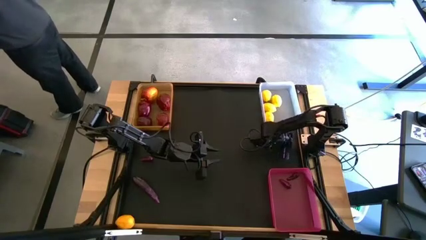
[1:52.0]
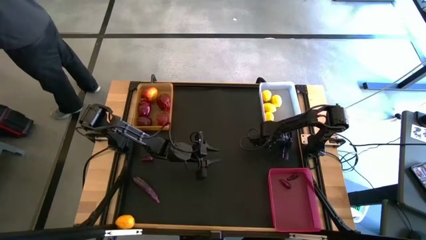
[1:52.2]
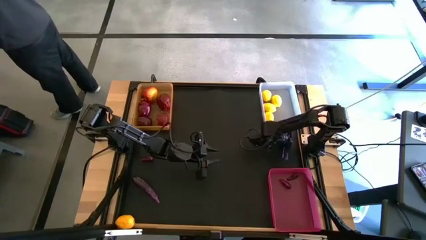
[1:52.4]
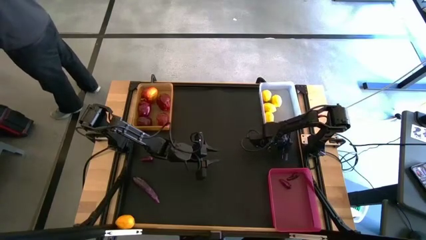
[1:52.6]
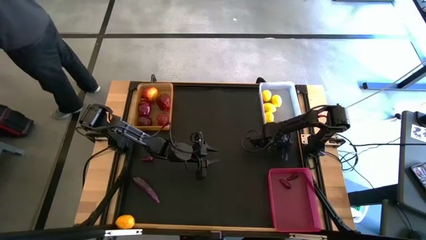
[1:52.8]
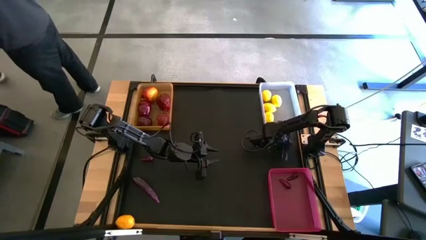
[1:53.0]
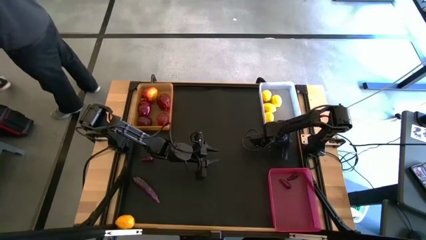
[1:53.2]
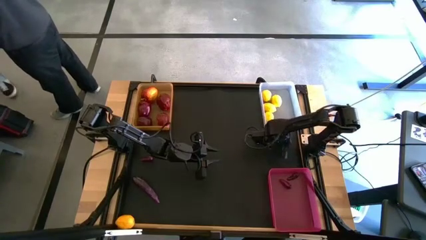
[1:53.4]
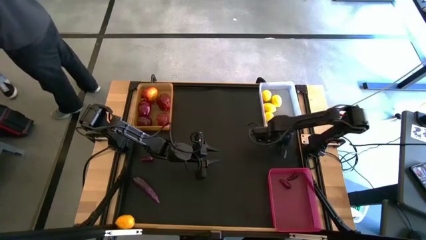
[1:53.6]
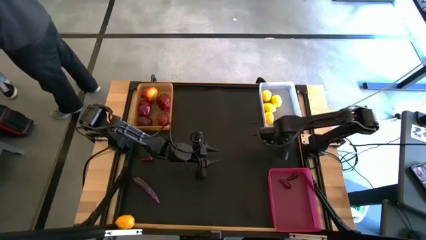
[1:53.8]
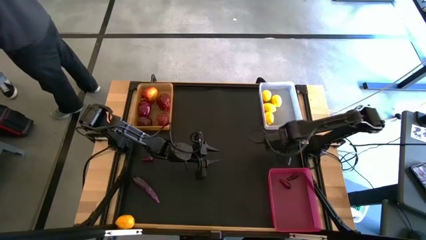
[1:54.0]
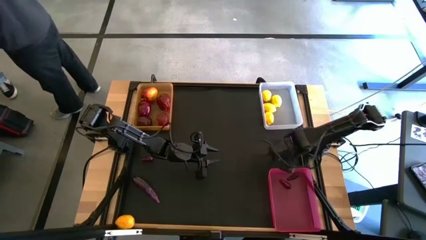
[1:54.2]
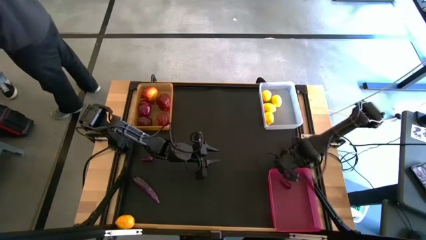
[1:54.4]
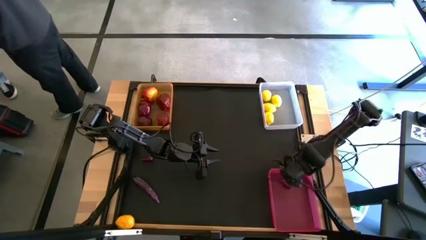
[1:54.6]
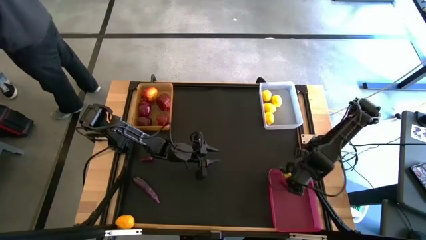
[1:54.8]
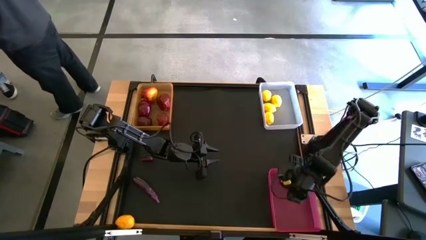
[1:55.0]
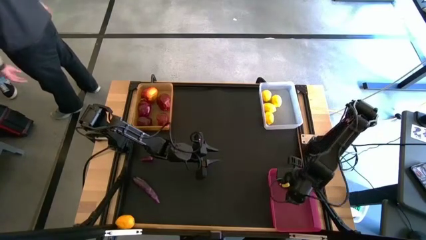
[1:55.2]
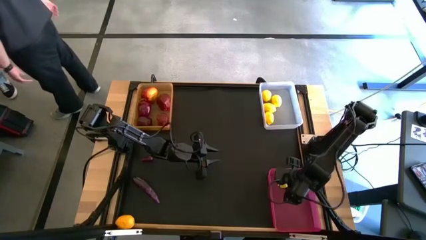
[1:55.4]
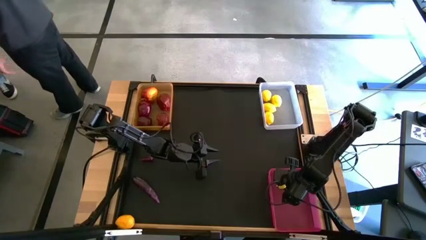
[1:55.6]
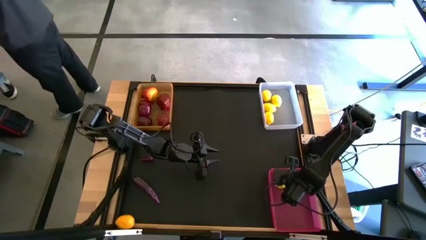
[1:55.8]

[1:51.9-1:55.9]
Task: Sort produce into baskets
Put the eggplant into the red bin

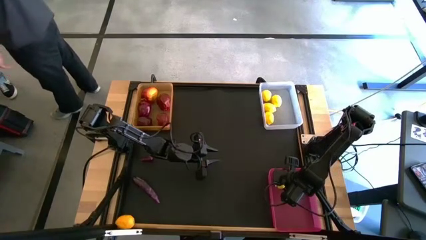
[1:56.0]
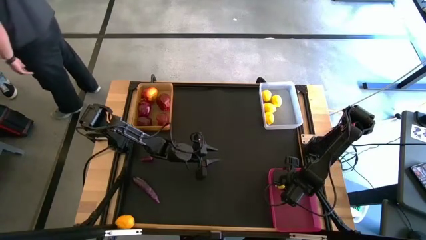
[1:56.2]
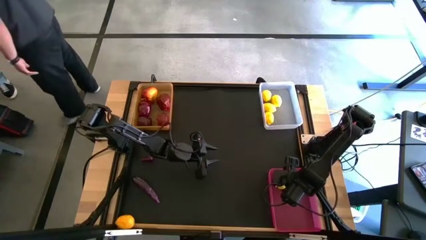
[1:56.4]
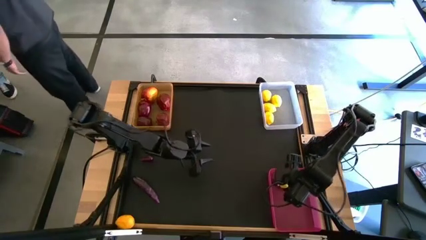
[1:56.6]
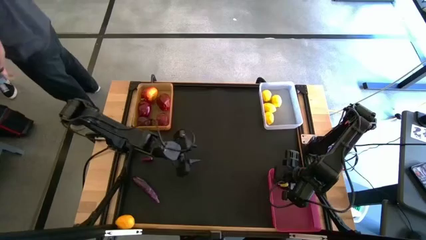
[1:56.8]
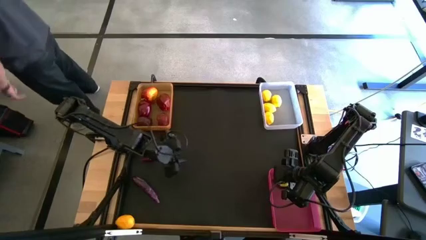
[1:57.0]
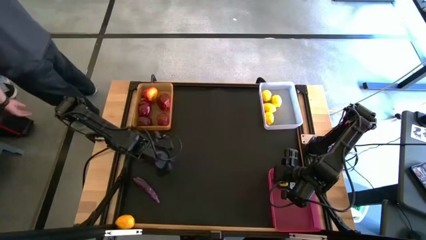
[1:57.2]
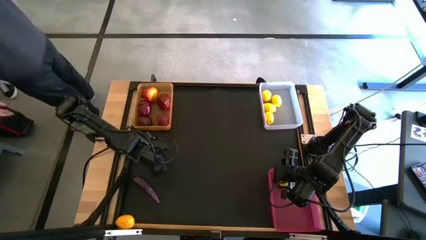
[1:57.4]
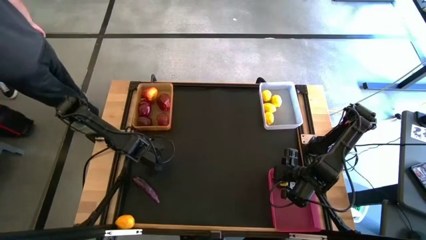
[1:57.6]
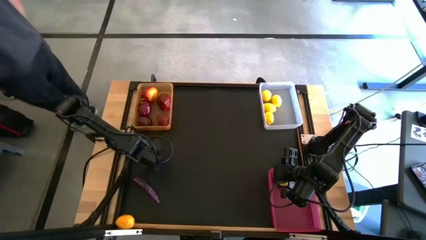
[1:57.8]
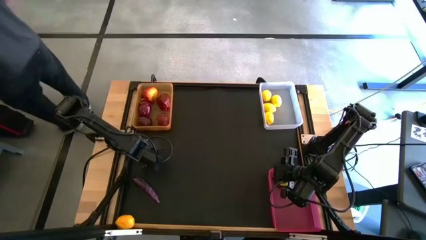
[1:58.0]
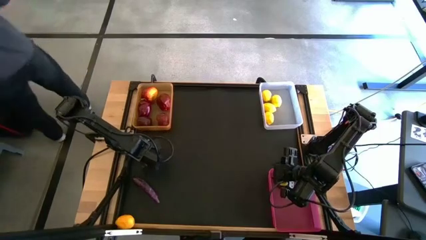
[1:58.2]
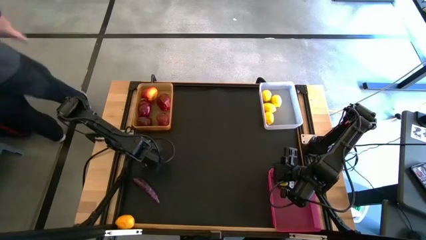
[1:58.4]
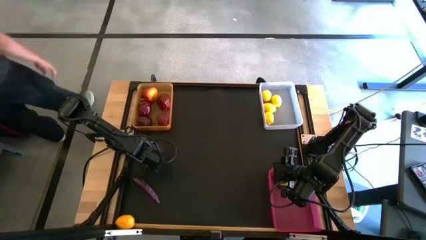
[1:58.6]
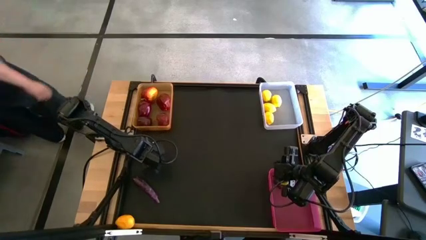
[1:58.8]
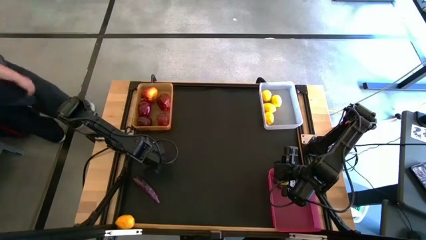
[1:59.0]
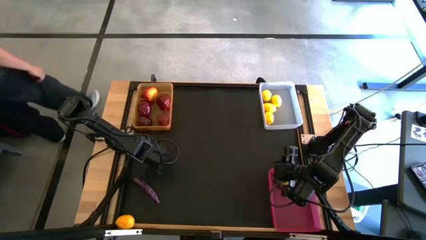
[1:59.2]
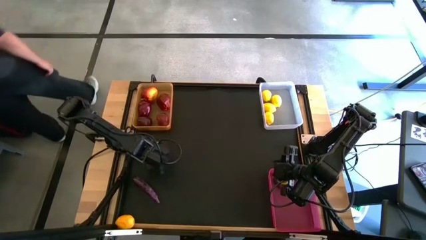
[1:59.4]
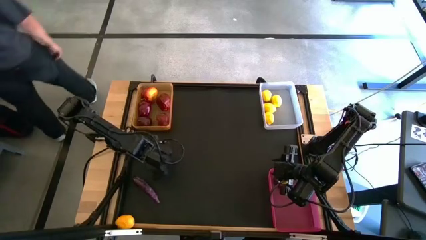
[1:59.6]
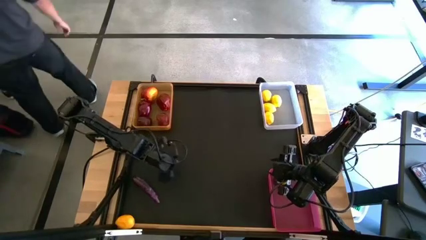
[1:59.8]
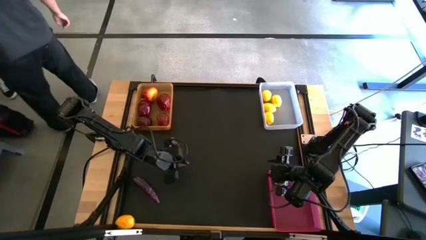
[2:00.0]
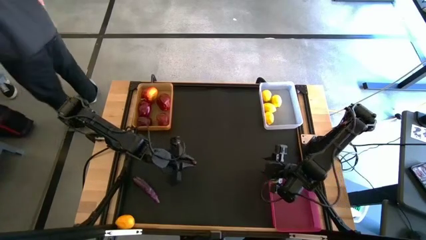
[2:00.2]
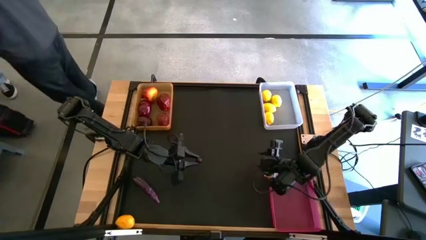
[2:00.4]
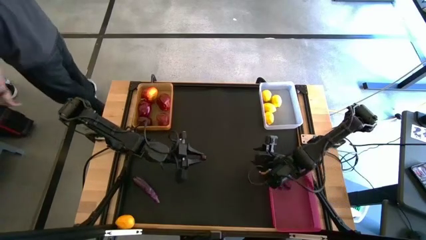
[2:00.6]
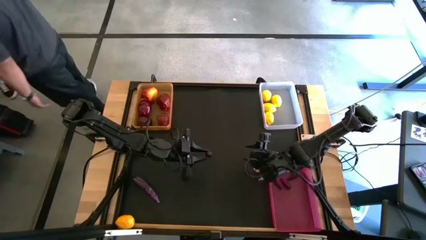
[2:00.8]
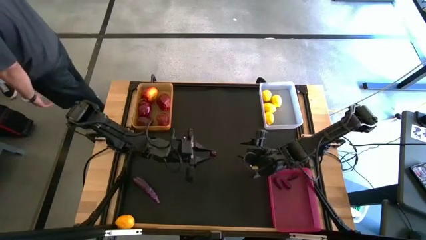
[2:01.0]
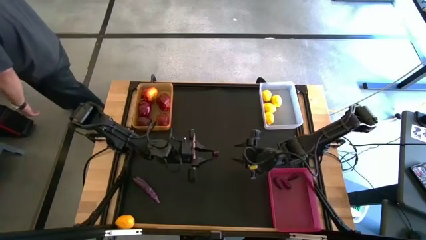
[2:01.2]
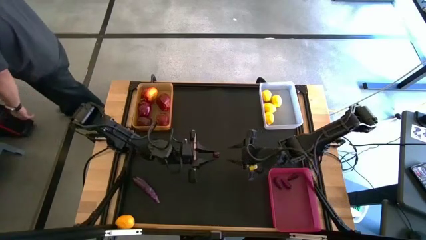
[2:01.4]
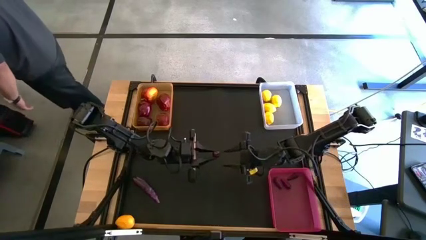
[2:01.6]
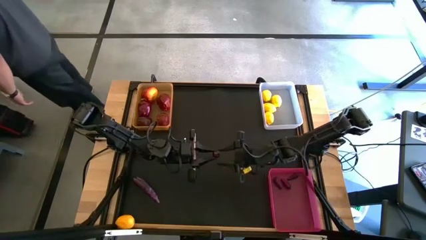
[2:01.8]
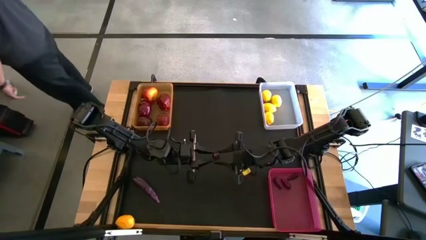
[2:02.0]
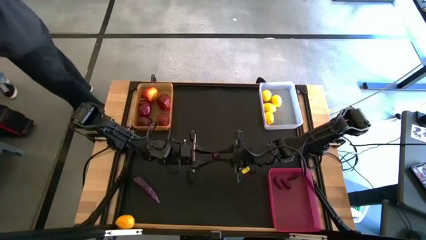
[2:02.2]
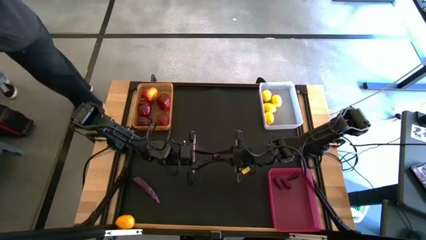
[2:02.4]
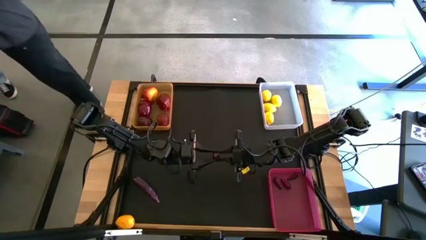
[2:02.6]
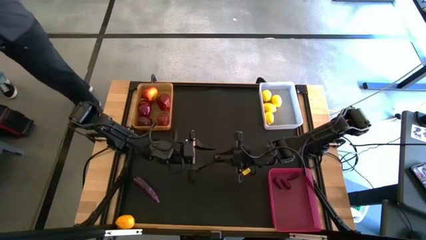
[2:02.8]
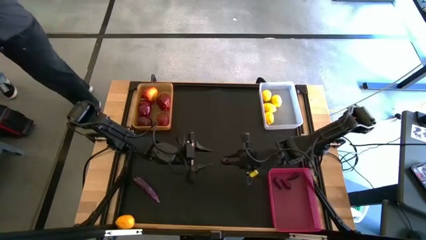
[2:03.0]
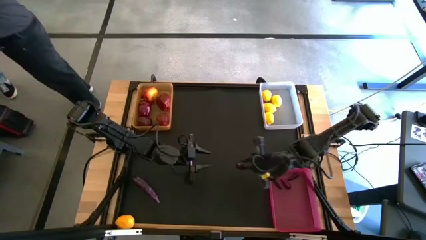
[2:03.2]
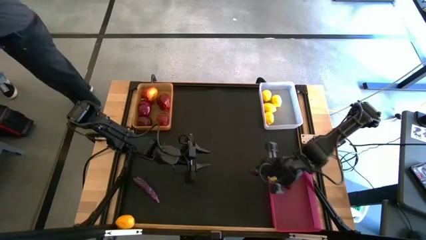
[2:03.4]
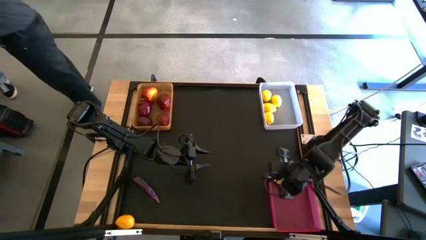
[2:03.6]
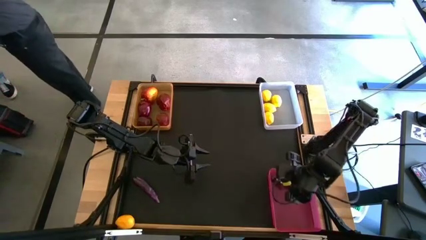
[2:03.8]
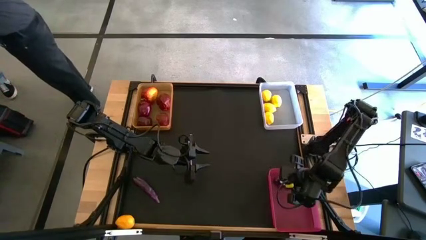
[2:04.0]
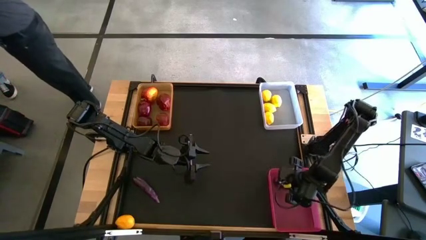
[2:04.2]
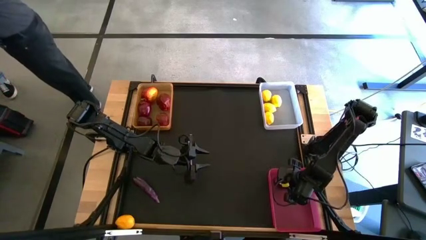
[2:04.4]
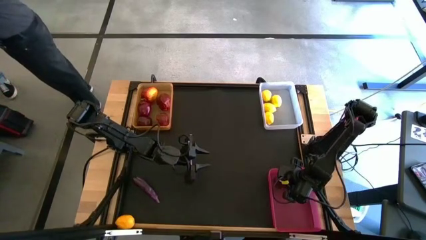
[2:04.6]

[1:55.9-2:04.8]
Put the eggplant into the red bin

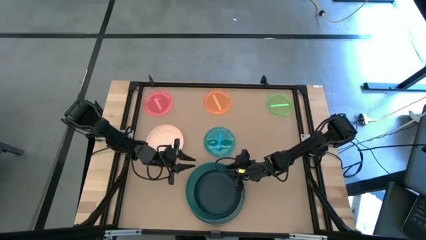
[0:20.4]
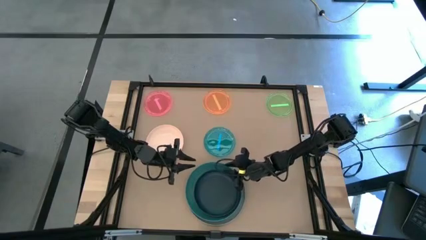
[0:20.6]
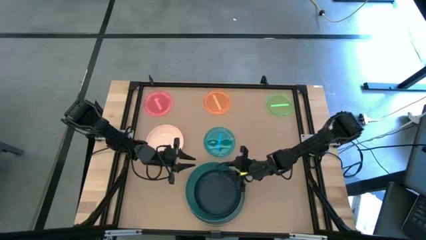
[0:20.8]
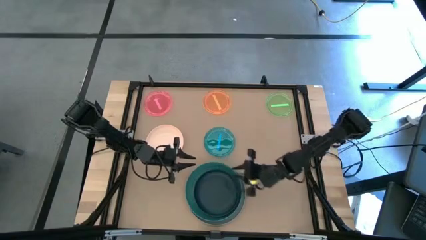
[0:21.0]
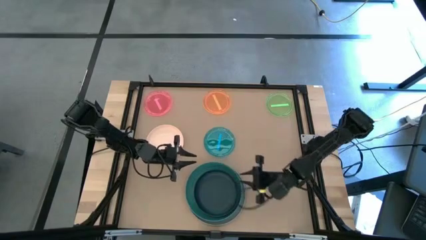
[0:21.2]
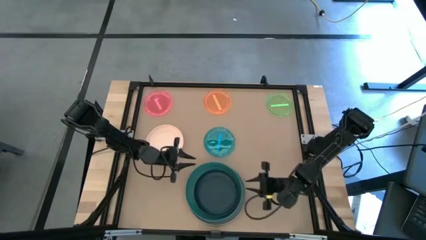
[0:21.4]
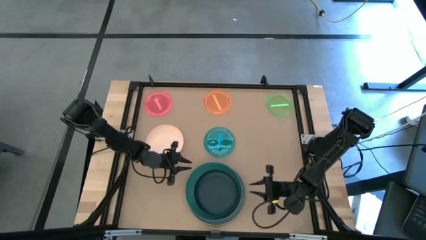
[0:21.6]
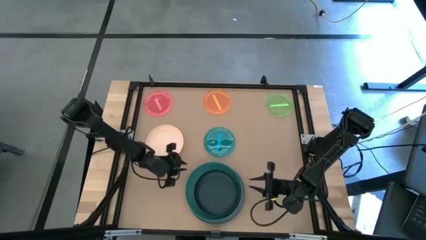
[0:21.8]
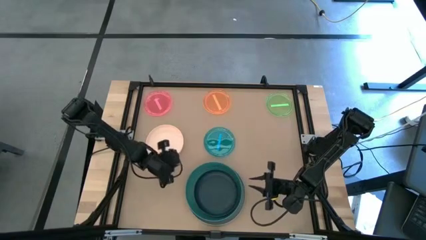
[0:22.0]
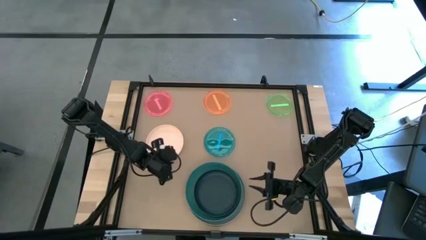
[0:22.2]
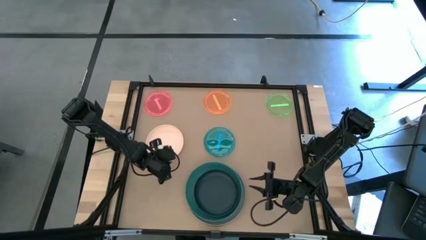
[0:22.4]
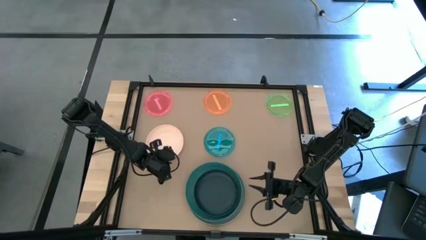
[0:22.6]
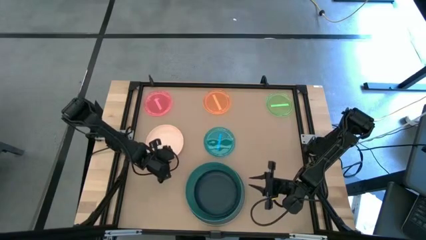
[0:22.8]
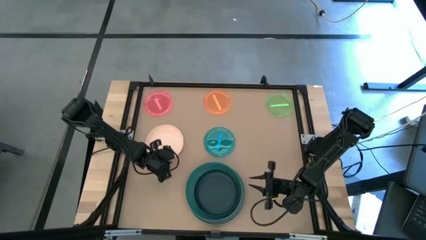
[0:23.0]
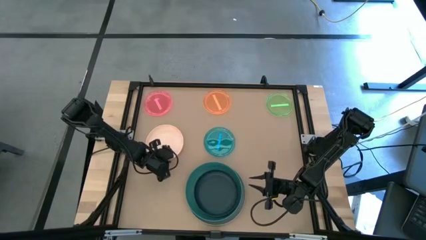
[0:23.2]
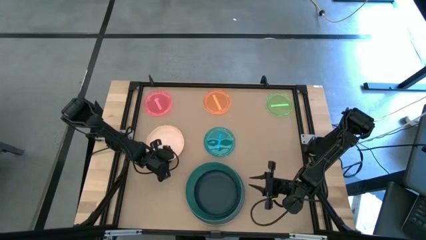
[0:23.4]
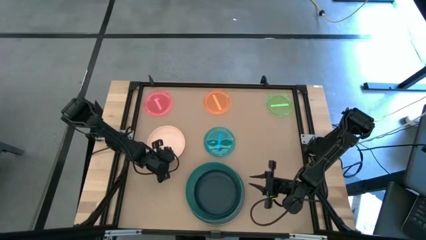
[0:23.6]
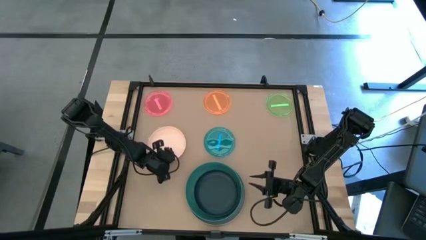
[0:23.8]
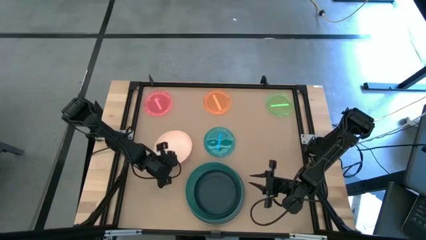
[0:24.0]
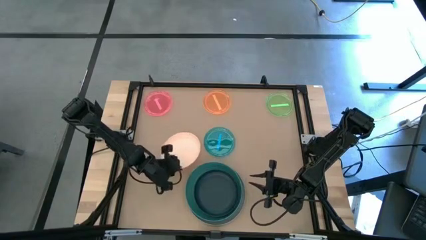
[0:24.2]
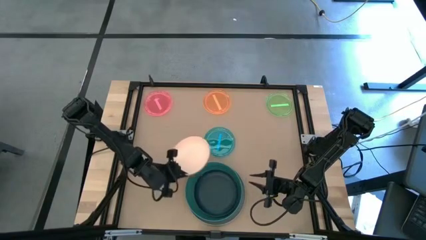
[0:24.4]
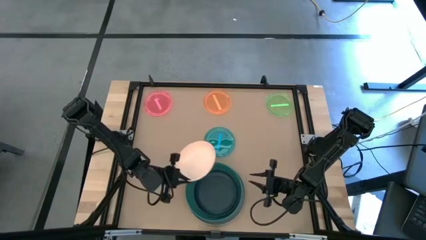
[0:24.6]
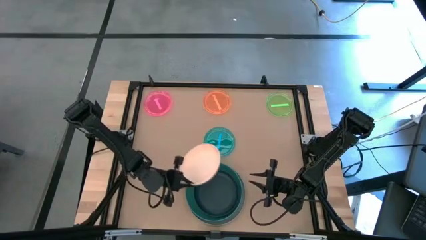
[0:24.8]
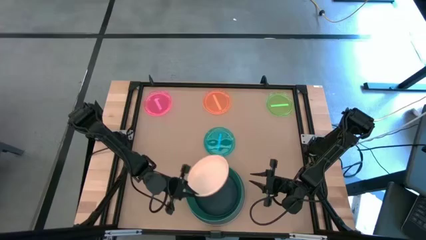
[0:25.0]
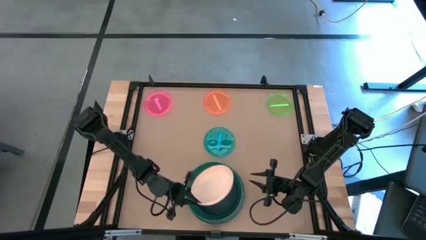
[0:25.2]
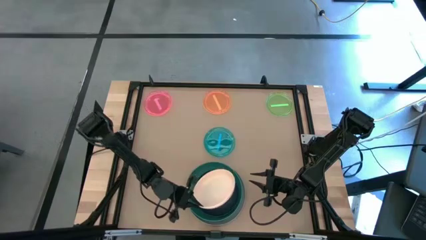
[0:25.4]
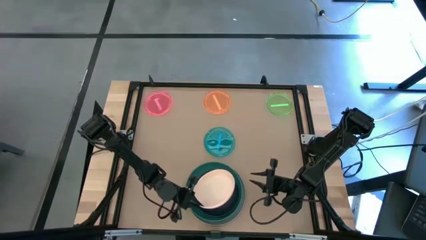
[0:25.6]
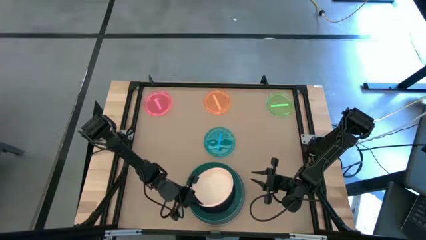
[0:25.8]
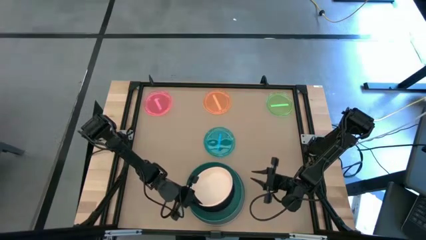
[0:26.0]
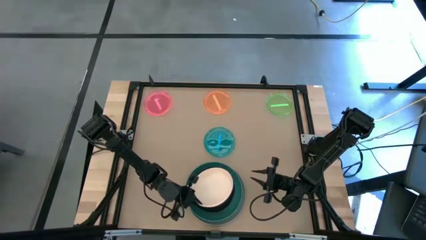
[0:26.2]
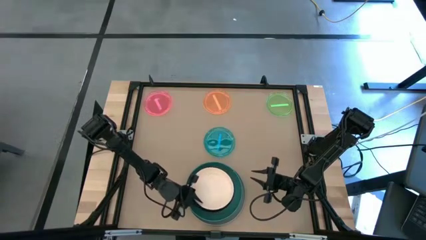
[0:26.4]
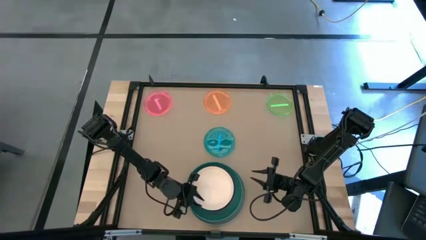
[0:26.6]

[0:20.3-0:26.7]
Task: Stack plastic plates
Stack the white plate on top of the black plate
